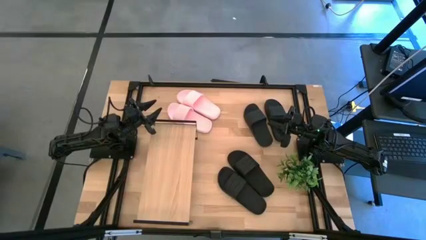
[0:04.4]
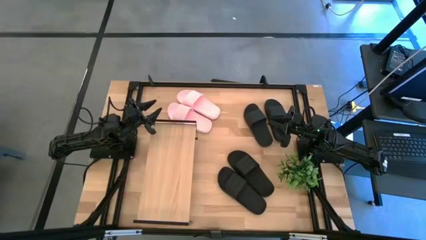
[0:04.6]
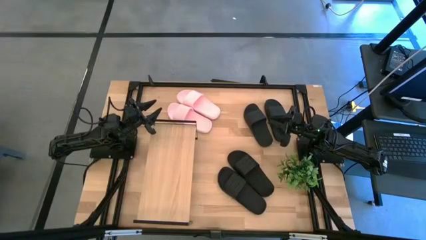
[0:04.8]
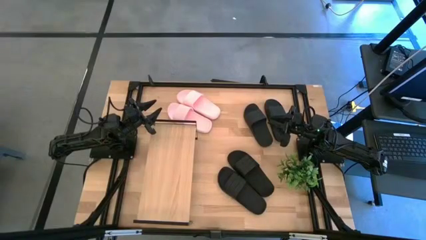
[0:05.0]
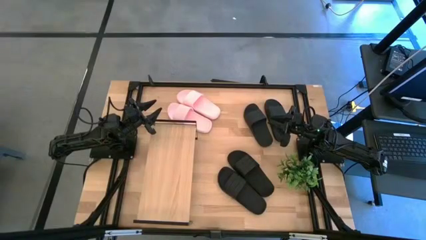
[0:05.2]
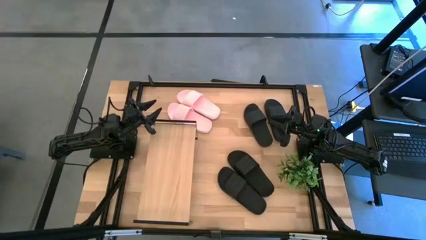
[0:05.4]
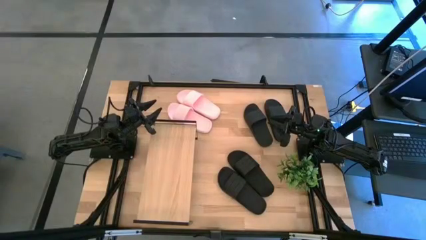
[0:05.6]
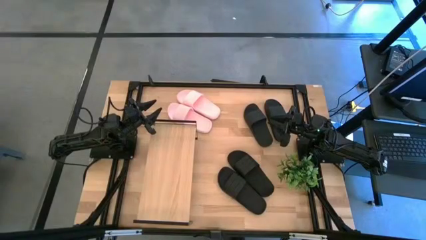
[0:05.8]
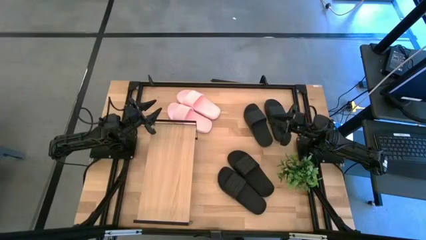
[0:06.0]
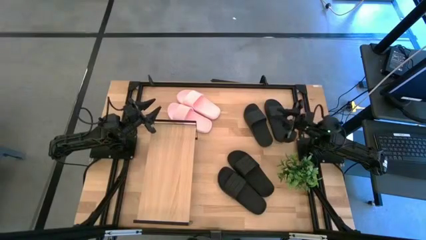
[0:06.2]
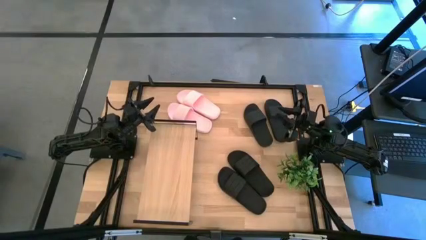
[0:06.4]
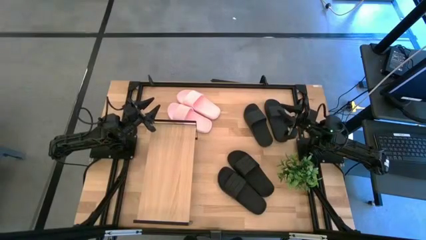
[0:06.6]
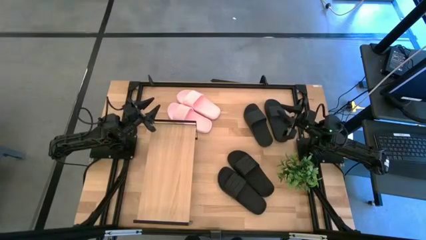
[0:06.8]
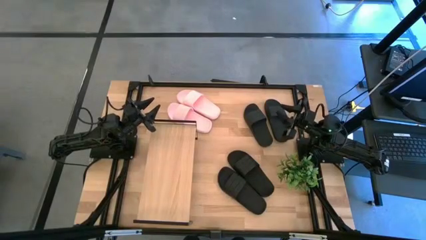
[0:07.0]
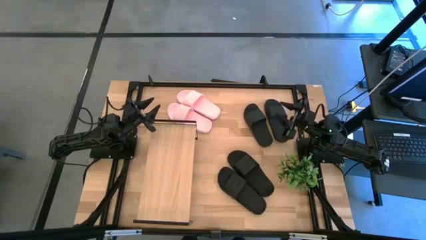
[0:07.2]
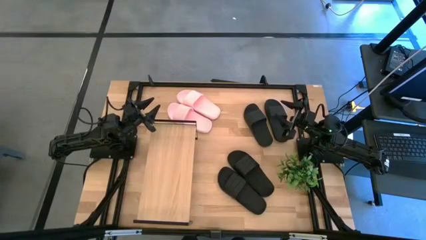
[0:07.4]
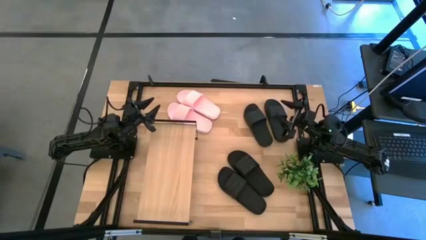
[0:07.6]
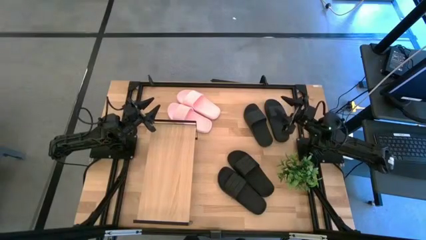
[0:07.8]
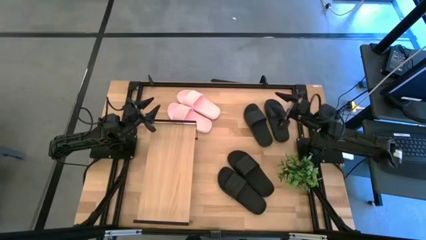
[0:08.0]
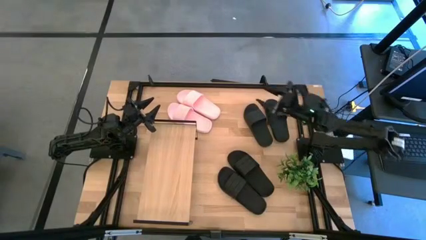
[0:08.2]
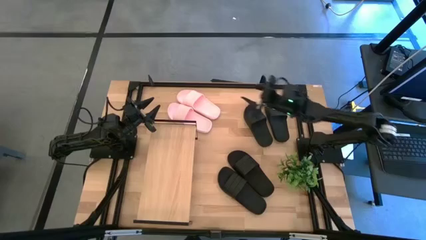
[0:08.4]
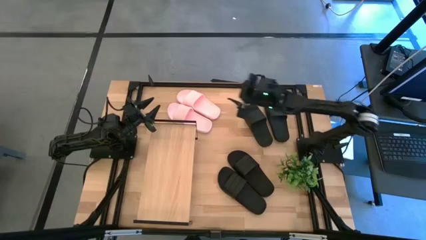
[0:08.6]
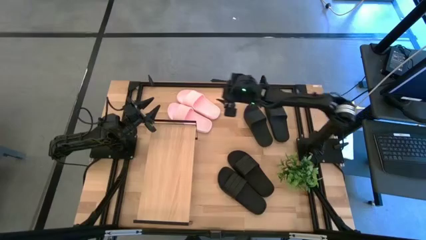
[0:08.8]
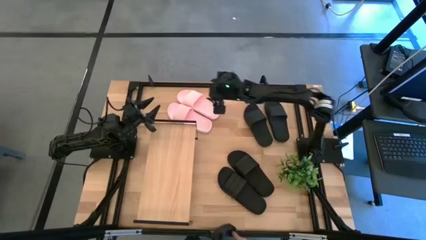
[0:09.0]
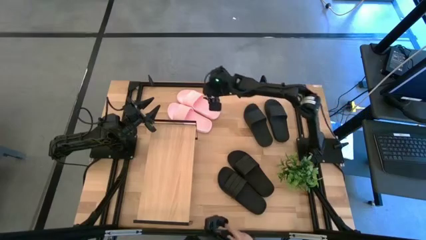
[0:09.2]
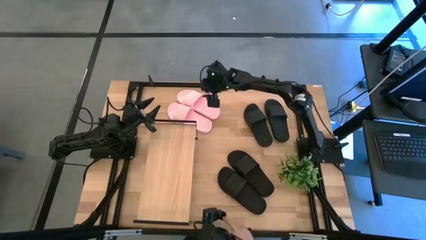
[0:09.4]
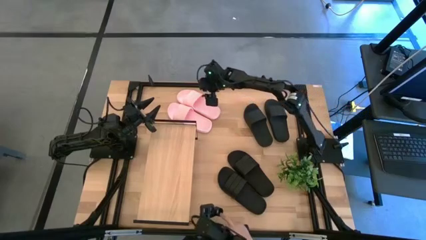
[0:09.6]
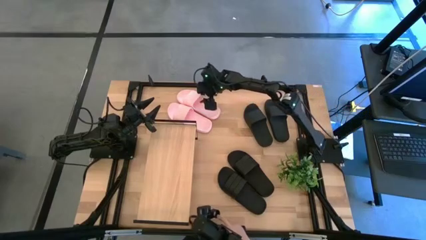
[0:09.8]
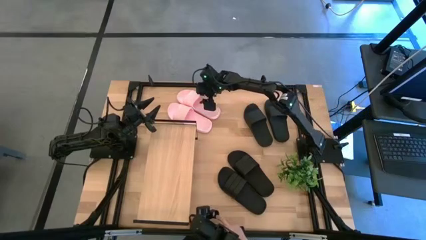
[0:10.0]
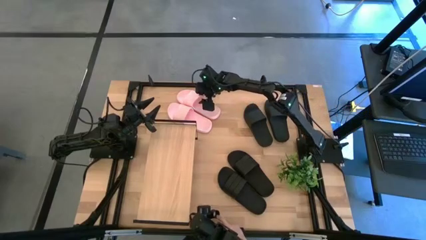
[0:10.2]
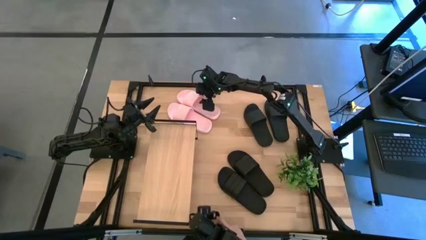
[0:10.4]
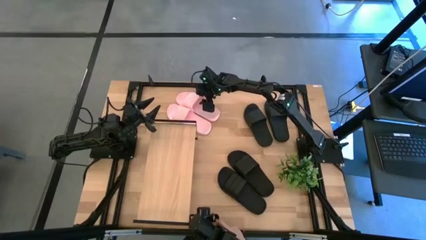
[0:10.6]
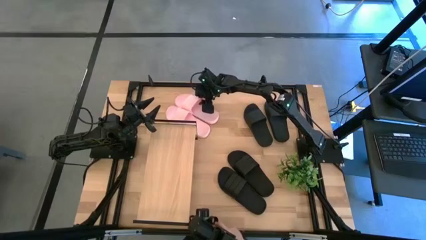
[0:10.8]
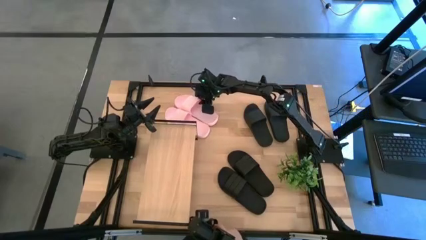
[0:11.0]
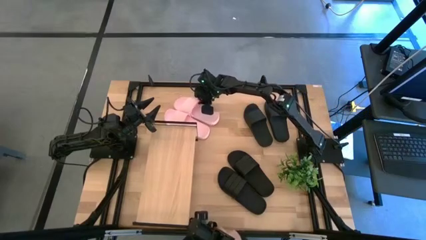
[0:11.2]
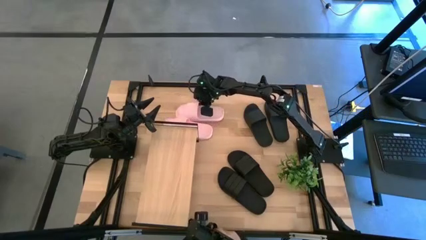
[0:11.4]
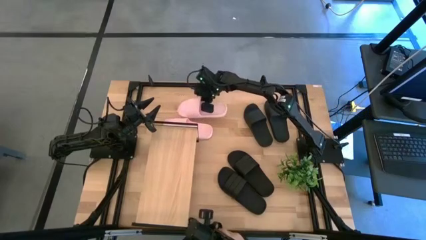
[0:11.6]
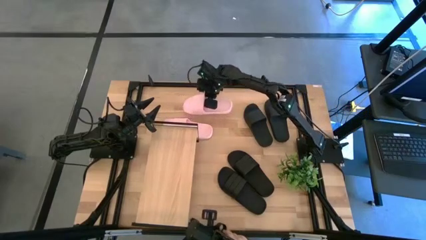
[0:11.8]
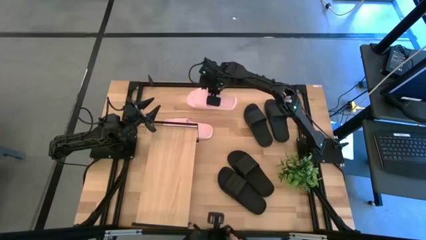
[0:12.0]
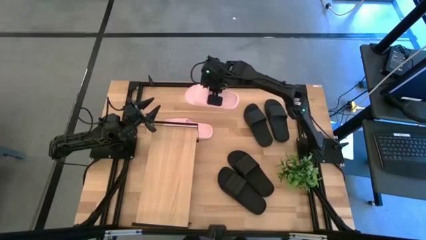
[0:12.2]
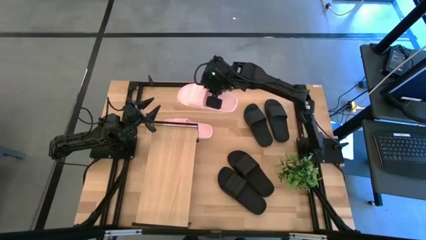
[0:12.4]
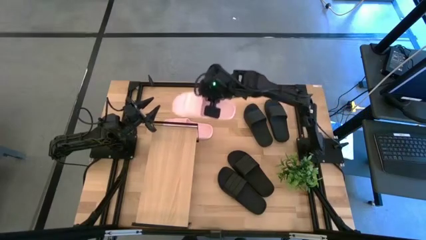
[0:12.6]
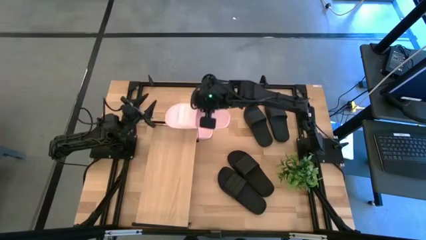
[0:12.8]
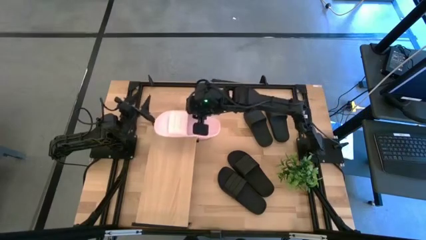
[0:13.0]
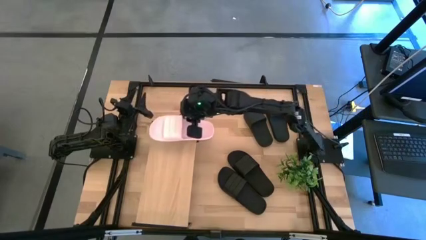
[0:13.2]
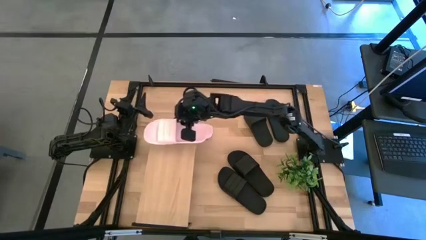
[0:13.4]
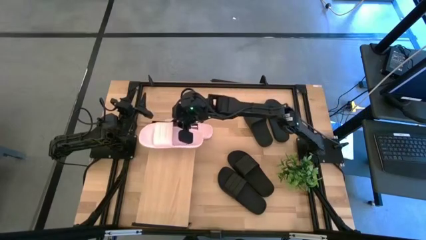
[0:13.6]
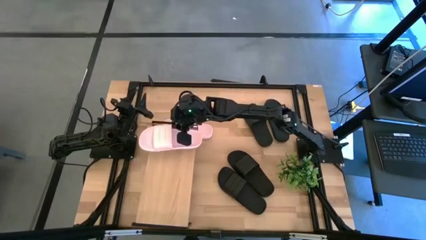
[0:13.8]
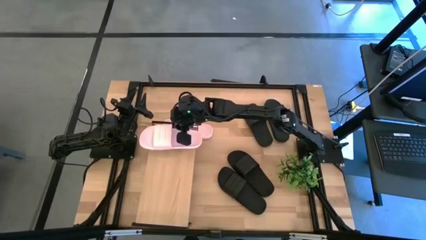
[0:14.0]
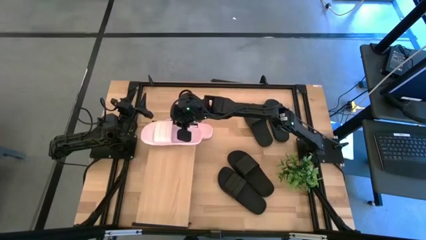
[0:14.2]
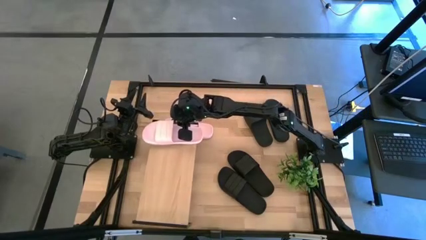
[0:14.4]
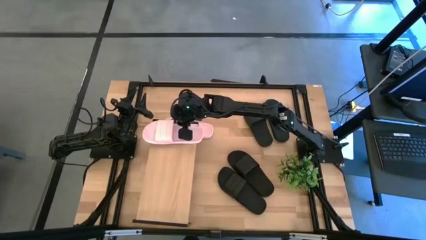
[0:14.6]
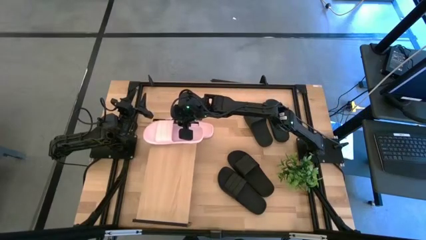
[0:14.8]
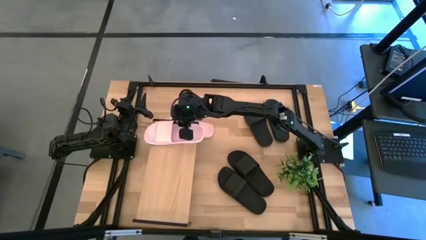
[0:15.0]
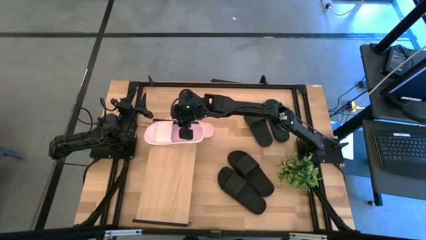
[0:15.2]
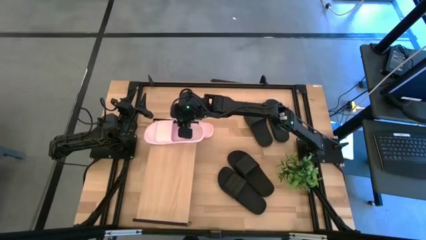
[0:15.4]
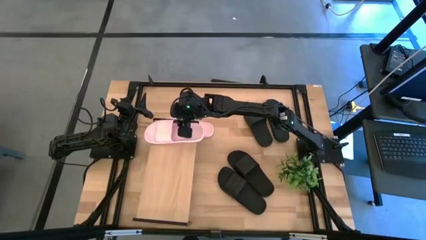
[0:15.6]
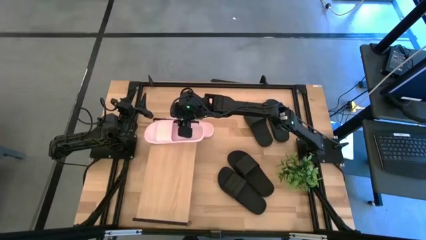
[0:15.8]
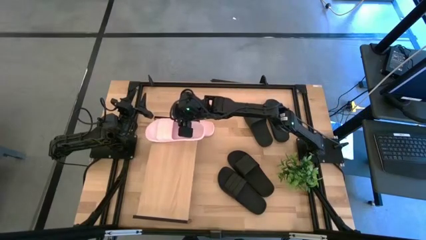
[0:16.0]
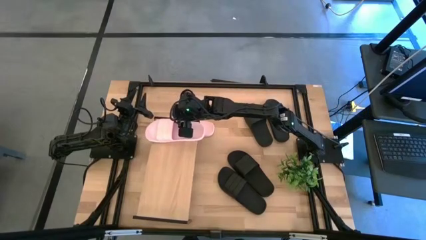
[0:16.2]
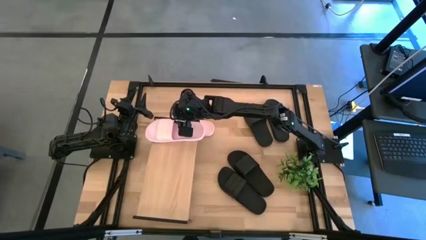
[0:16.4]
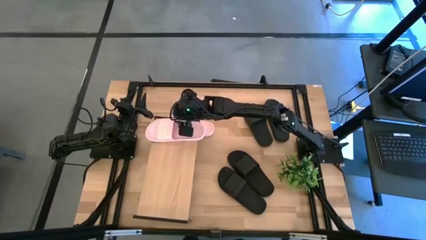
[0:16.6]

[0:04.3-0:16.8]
Task: Pick and place slides into the shelf
Put the pink slipper on the shelf

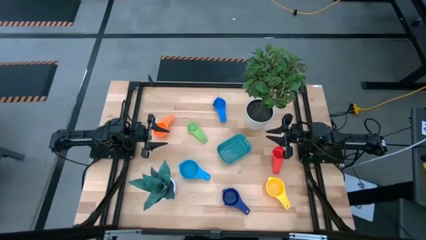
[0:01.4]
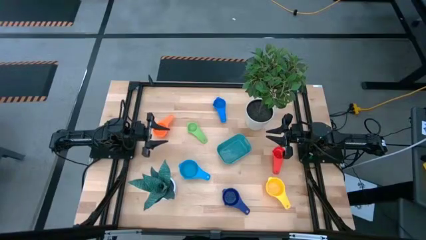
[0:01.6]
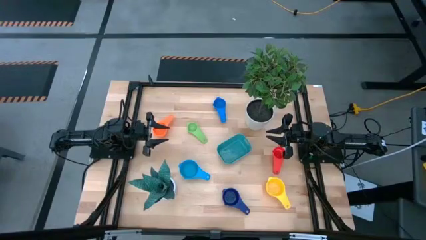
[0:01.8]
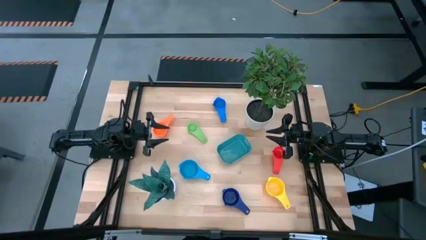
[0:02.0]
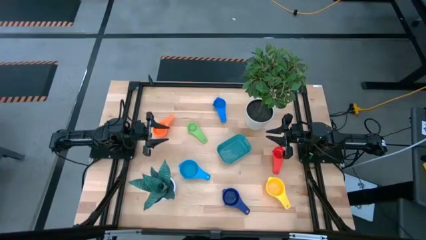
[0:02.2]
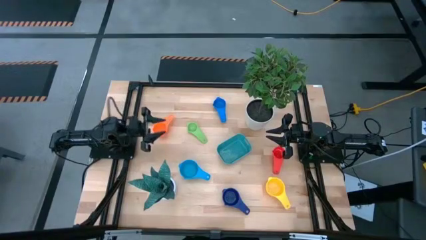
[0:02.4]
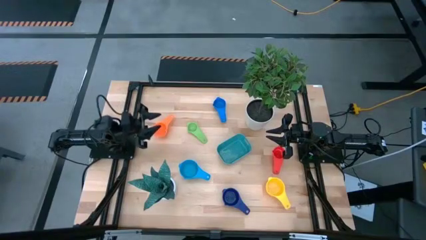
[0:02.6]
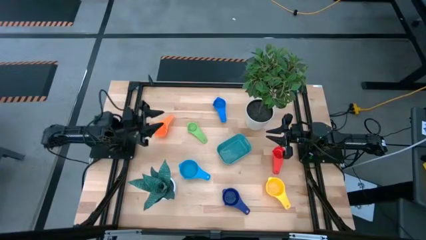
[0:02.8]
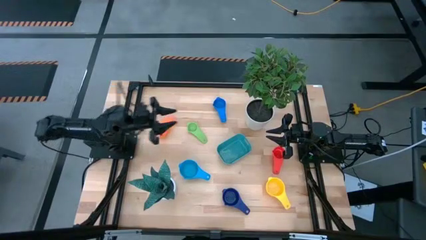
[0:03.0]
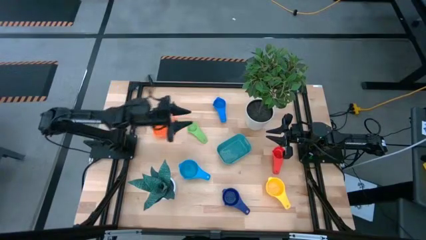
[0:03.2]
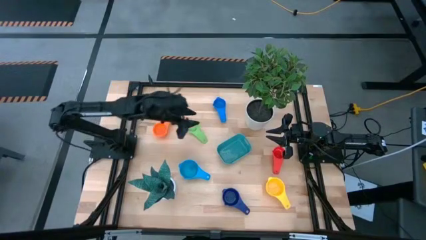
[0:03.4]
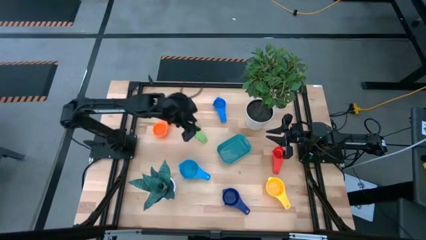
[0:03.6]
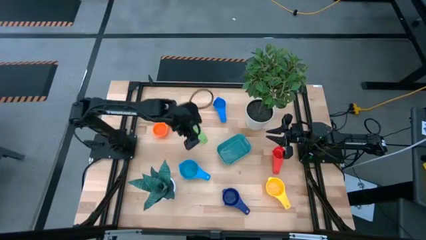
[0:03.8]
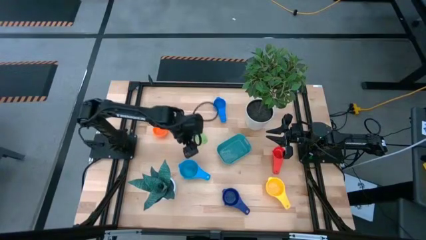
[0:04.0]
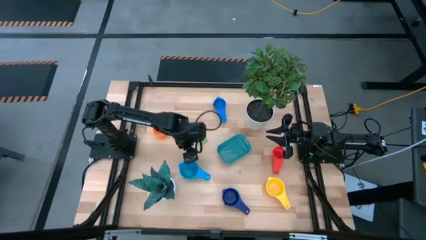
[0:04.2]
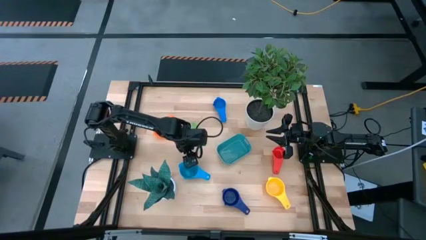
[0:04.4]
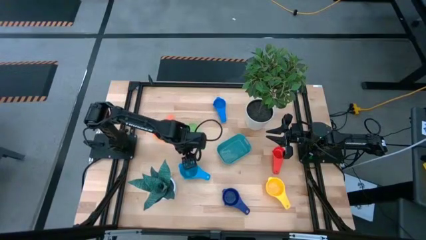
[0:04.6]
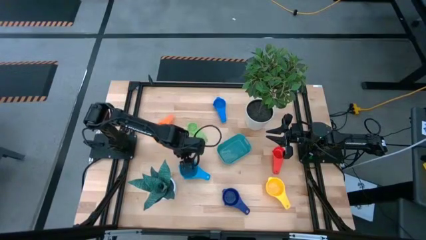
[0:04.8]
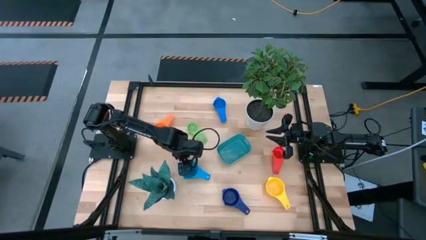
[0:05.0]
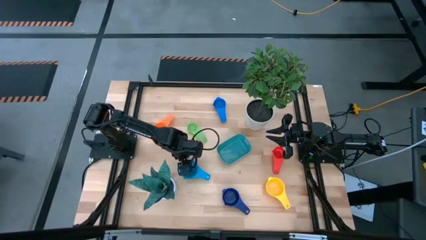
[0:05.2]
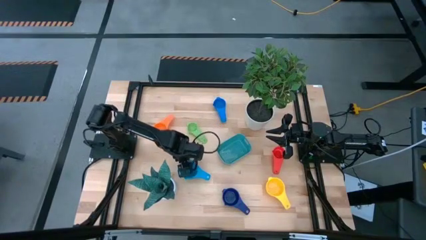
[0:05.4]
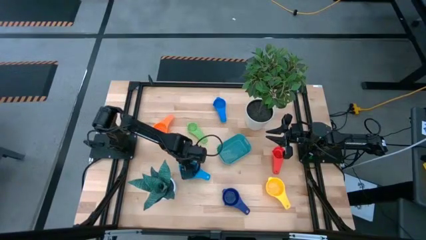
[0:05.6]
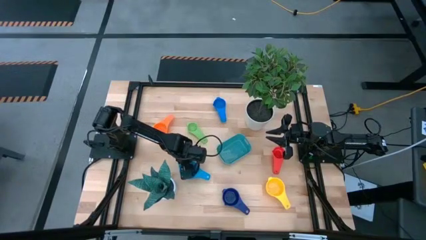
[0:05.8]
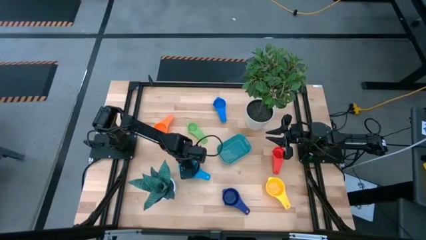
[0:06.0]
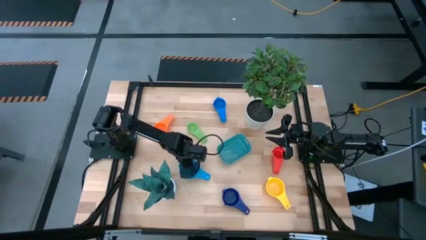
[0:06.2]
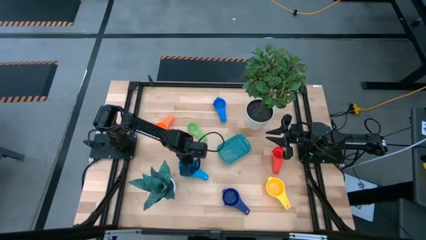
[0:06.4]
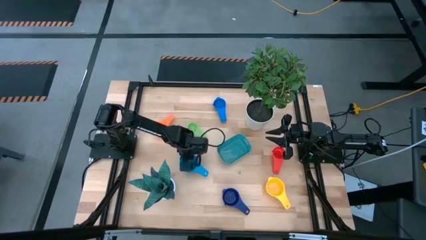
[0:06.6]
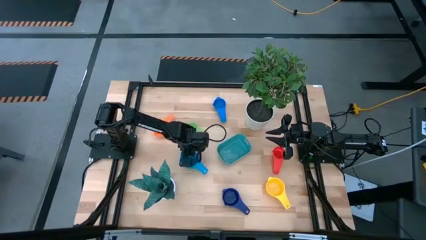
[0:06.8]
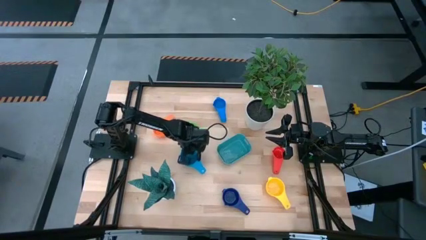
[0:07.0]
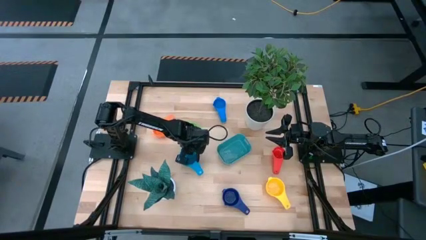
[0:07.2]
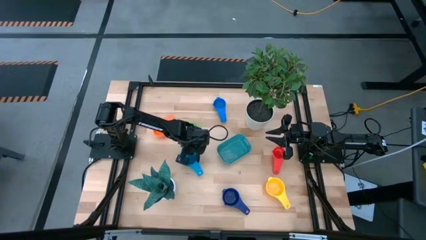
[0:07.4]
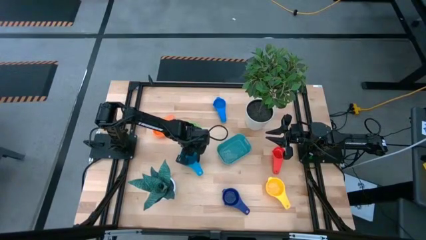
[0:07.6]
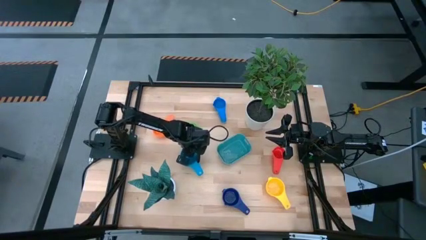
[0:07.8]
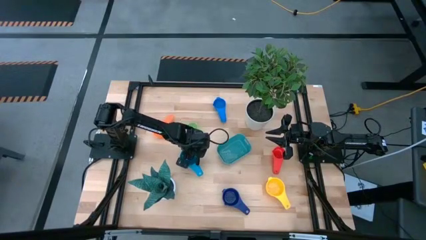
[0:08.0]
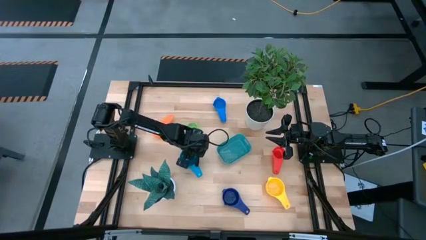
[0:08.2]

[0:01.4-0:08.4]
Task: Nest measuring cups in basket
Adjust the light blue measuring cup on the table
